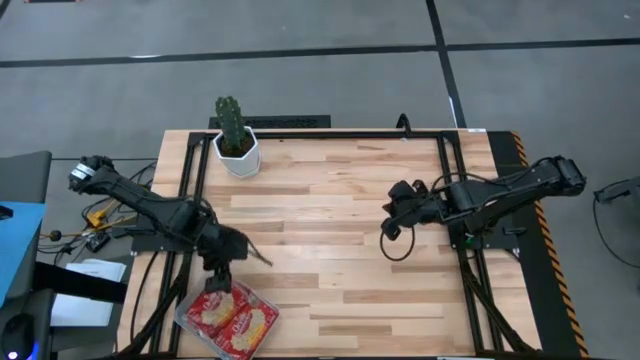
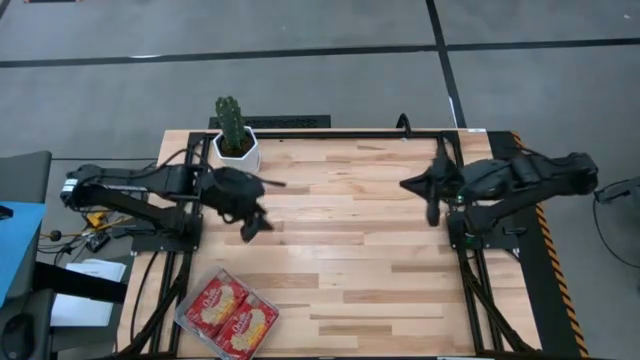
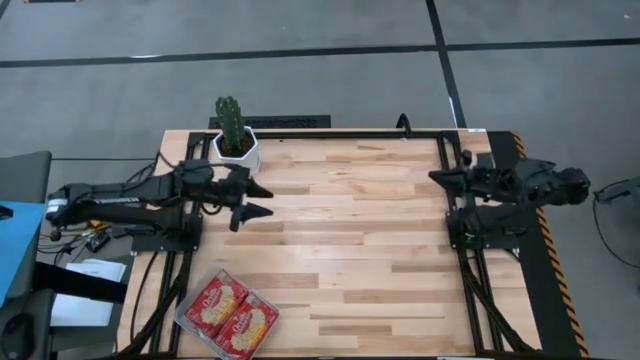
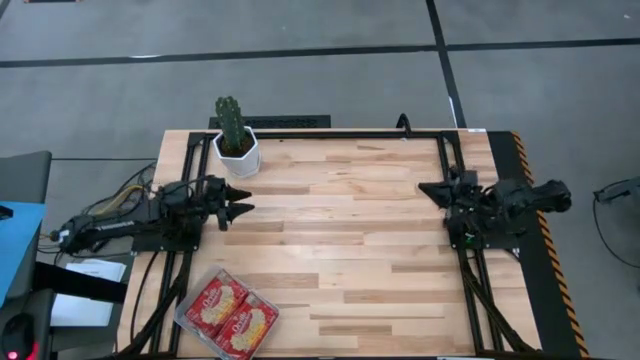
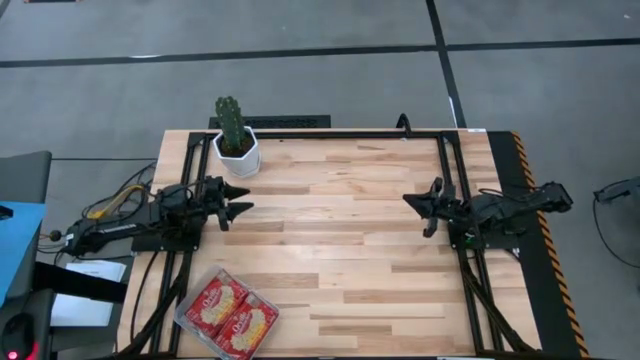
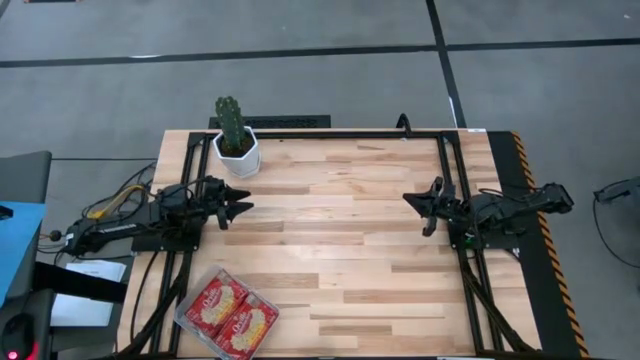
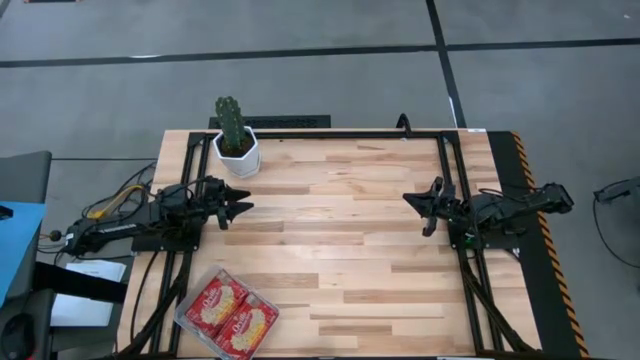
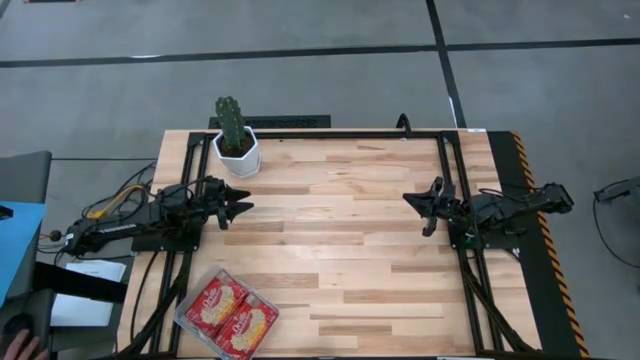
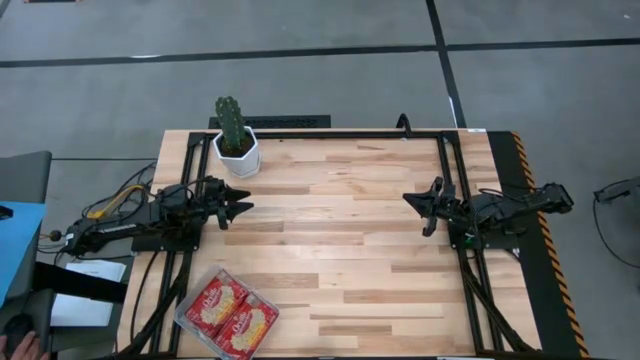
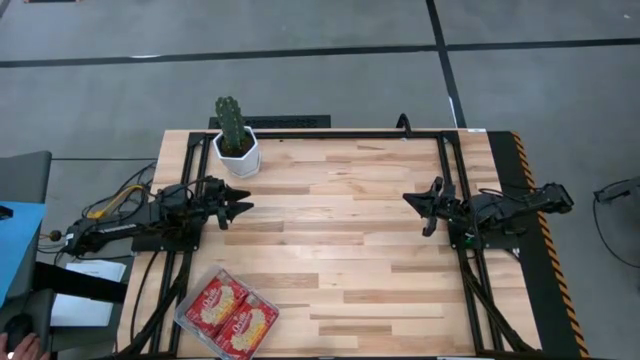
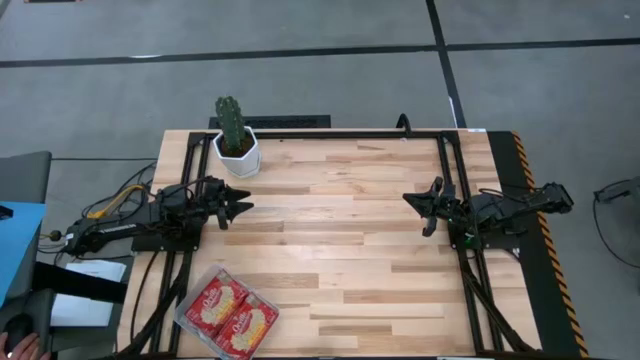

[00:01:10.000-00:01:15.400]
Task: Sort popcorn bags into baskets
Return to home position

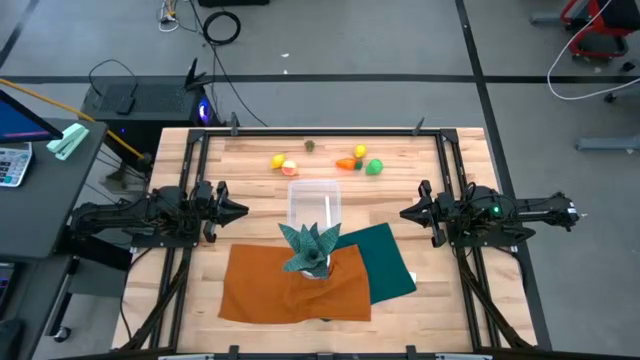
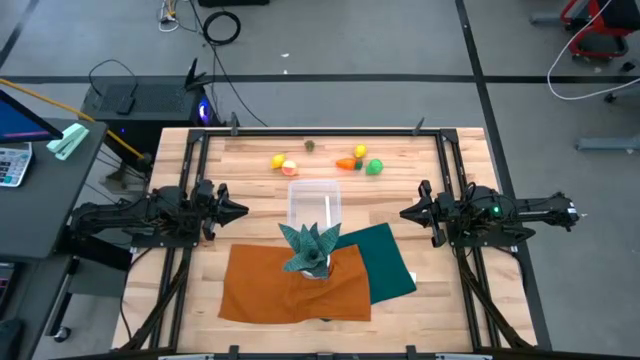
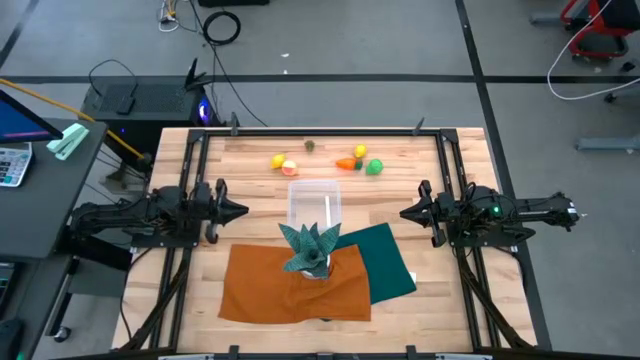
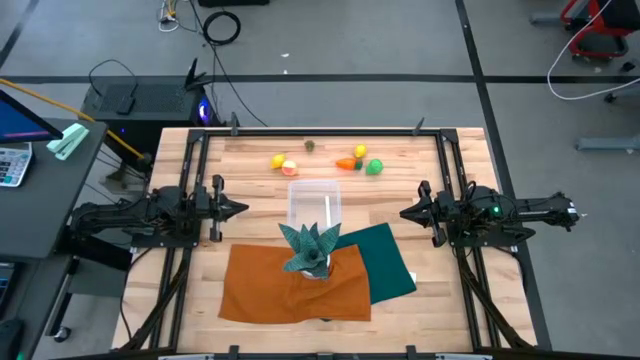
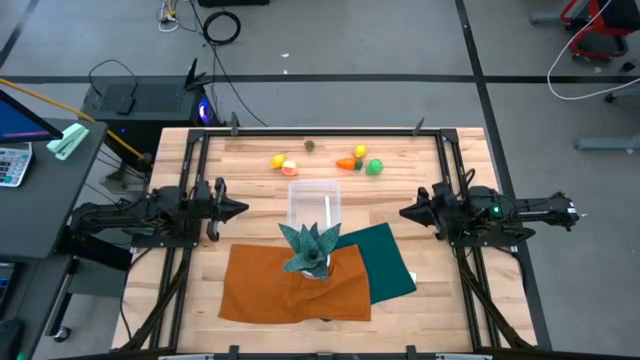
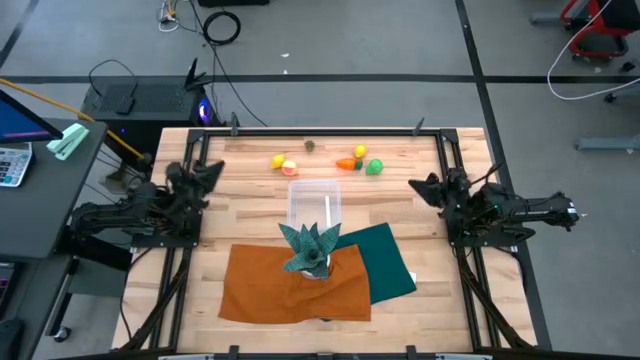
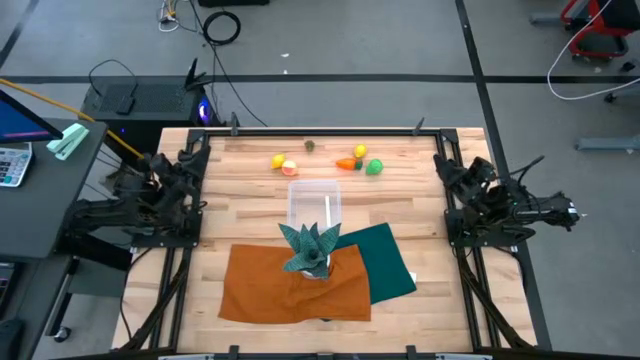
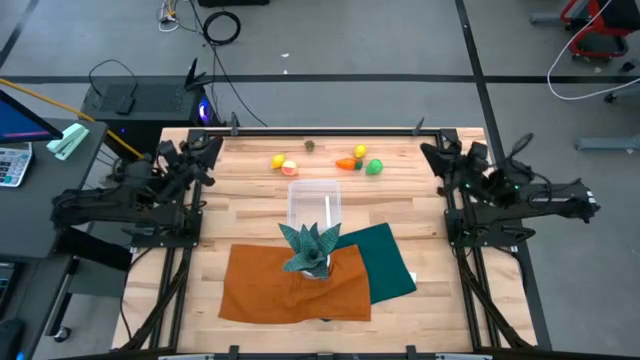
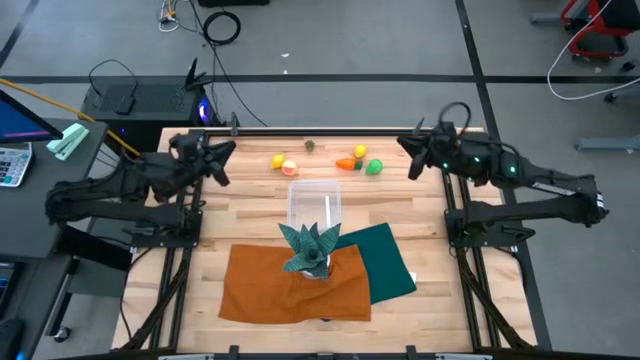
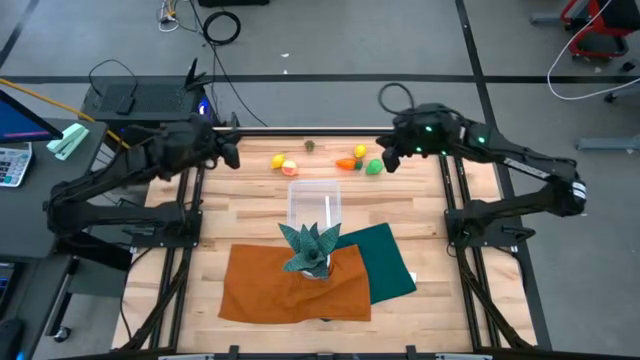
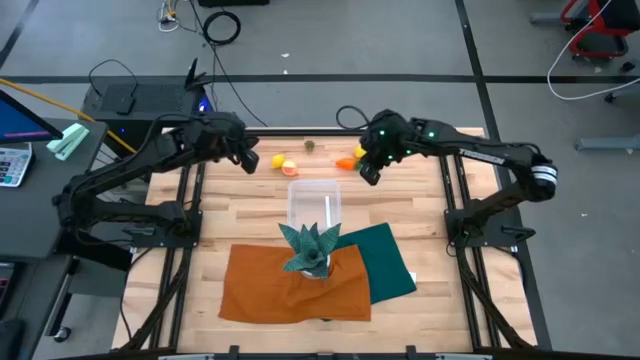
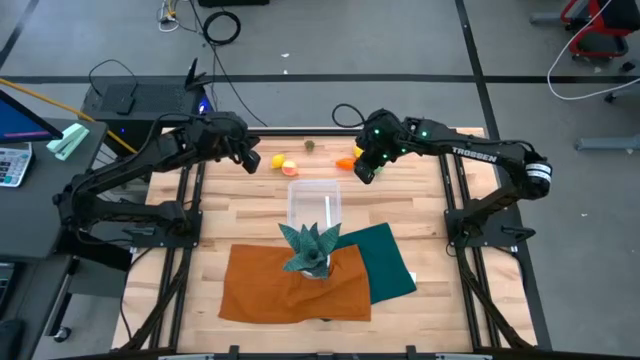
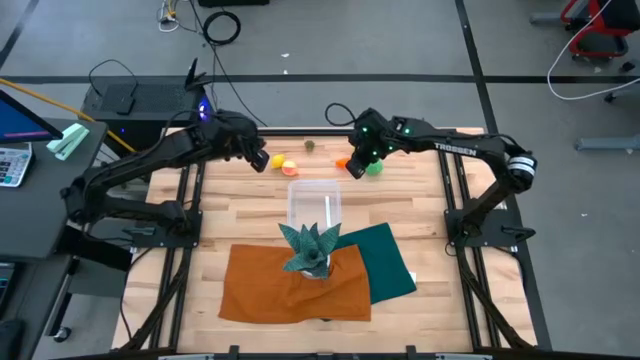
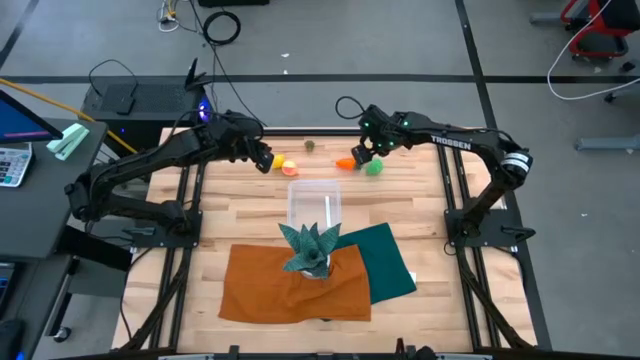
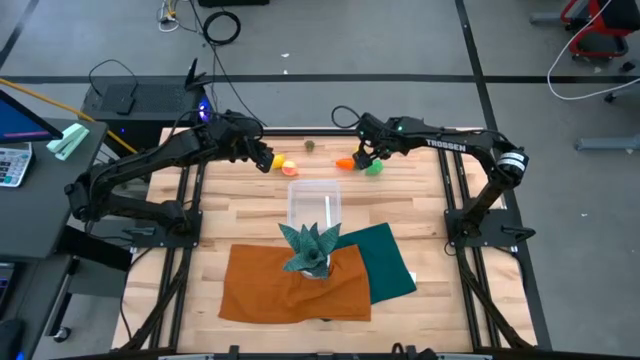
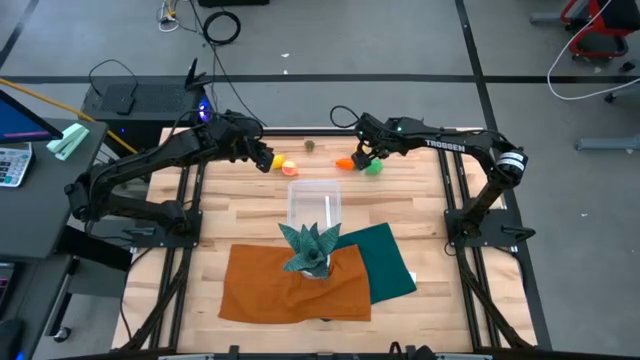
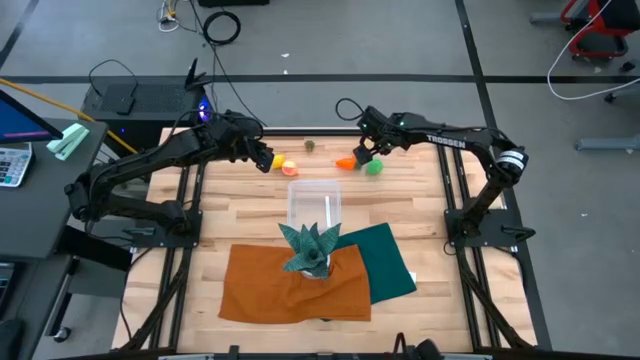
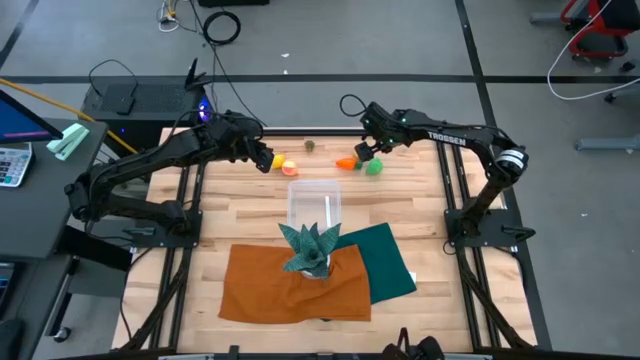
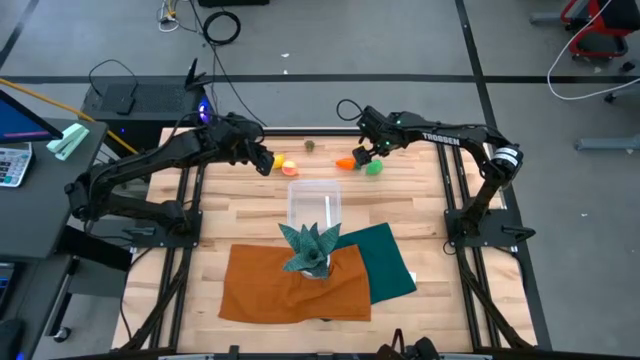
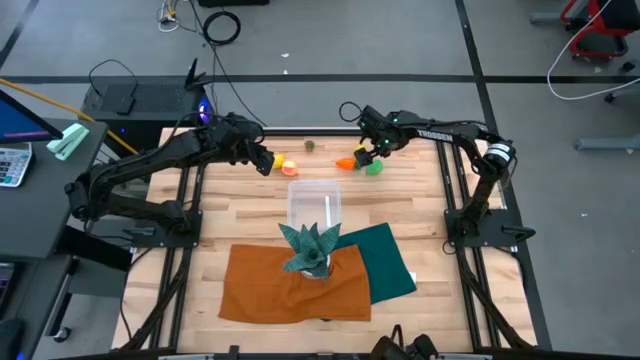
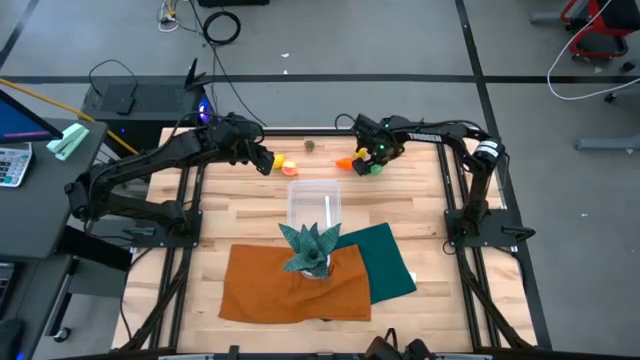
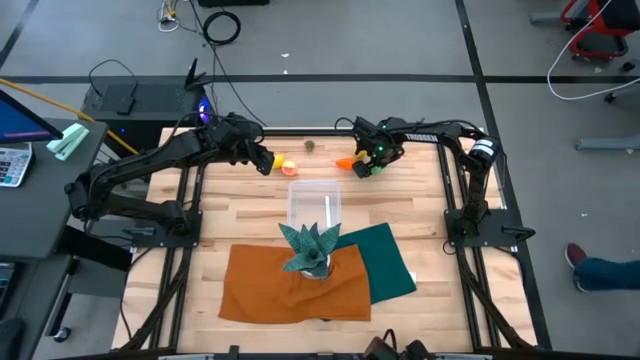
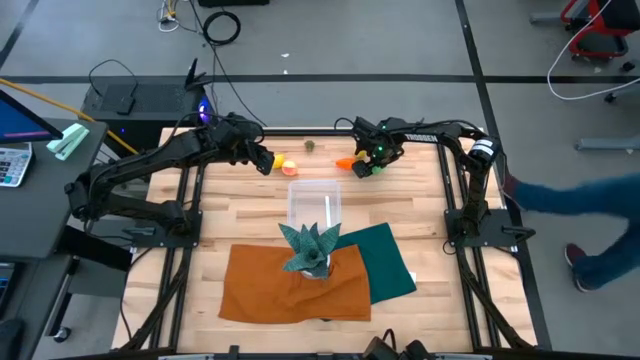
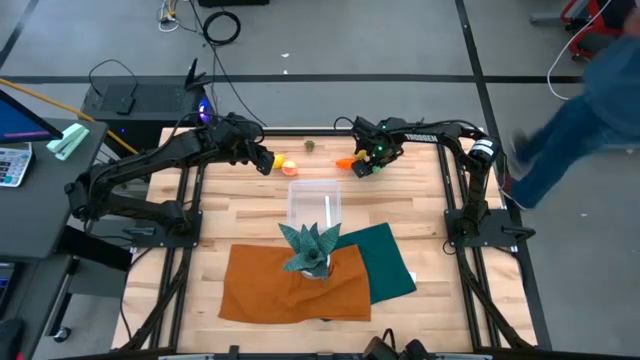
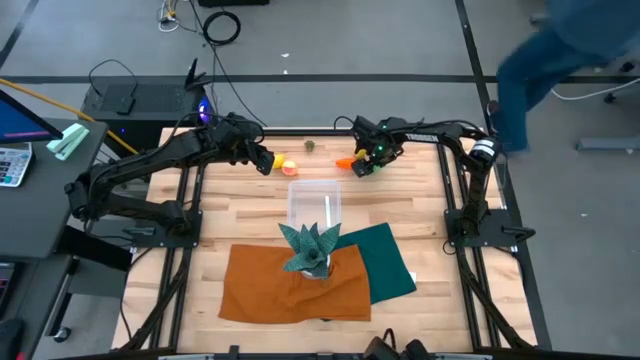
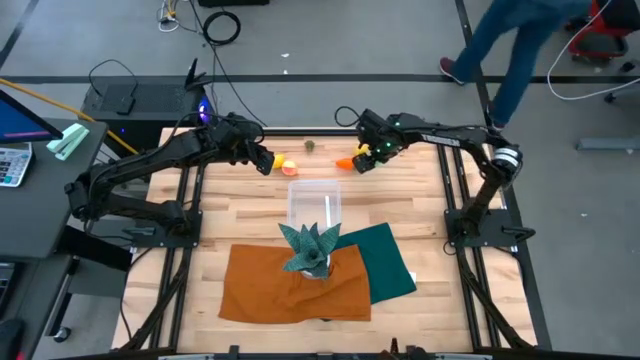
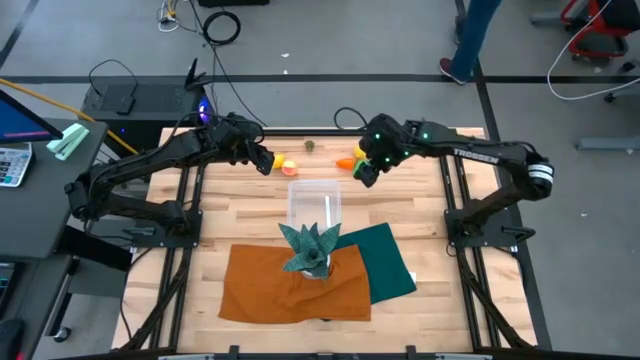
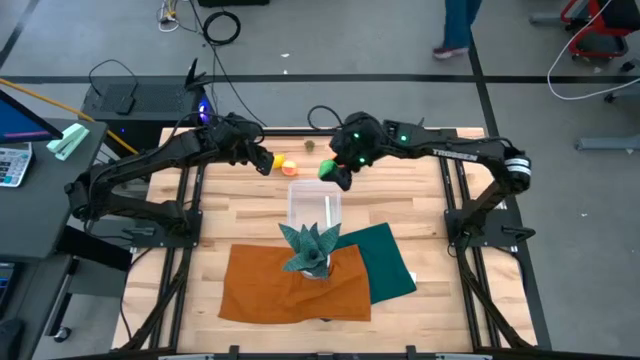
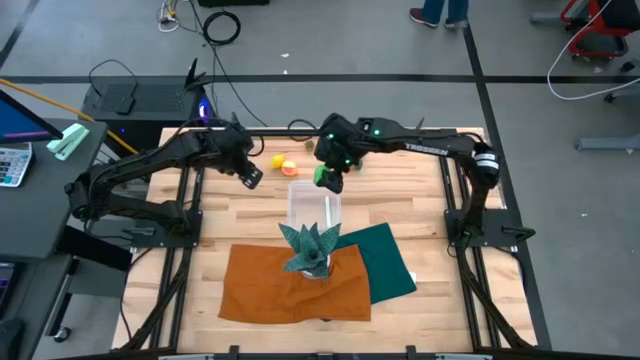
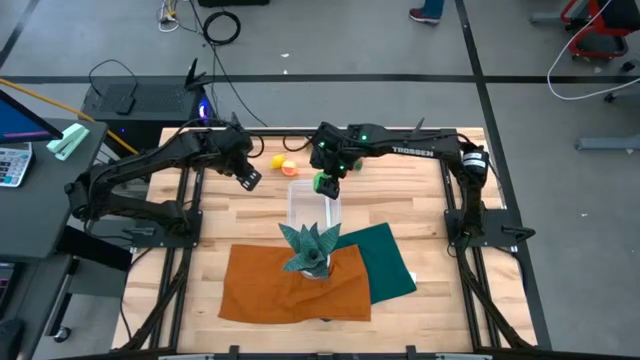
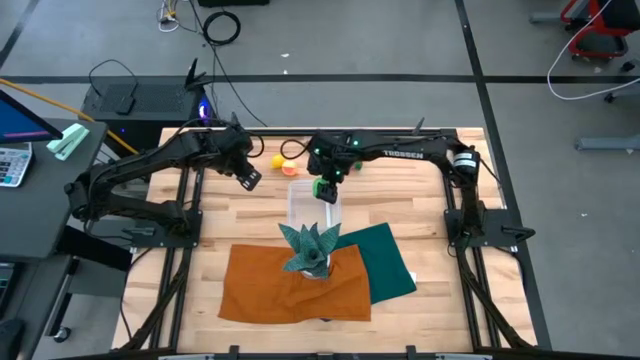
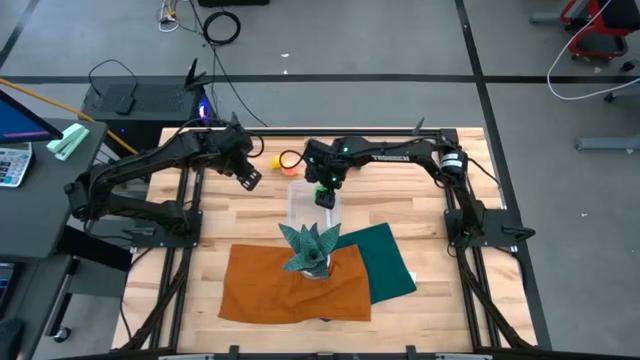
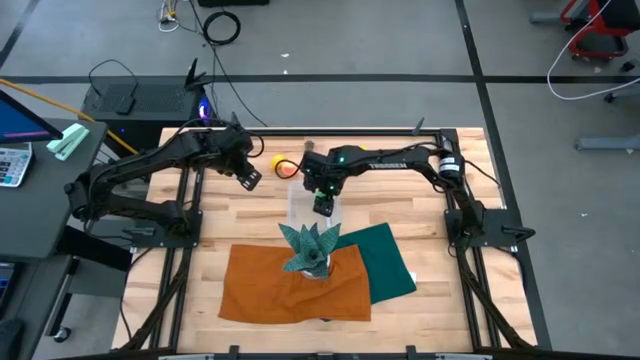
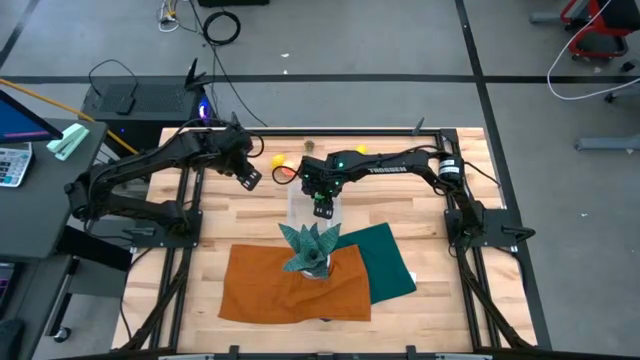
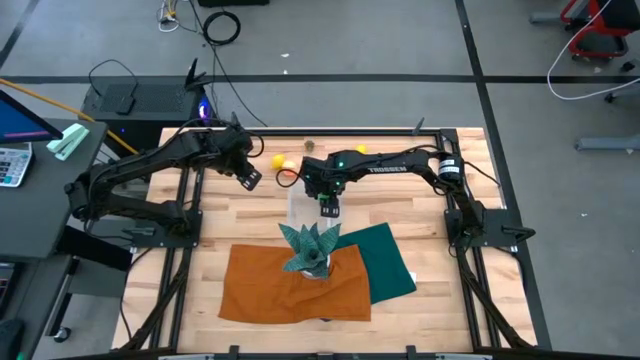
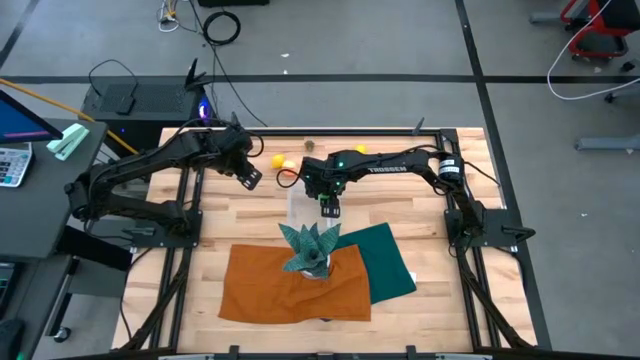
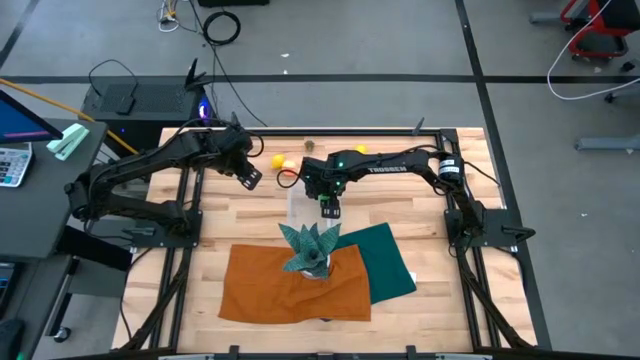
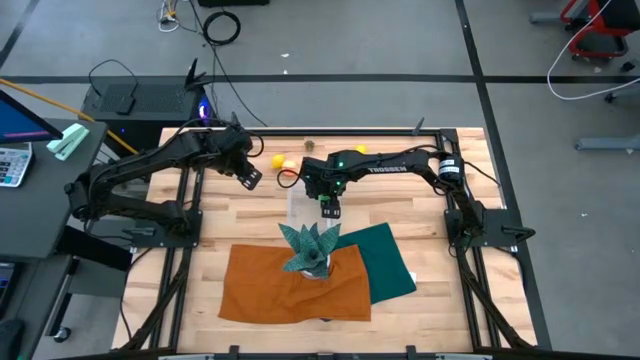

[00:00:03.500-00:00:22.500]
Task: Pick and placing Produce into tupperware
Put the green pear into the transparent bin
